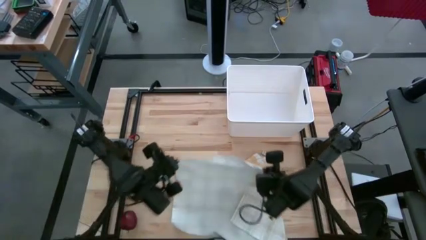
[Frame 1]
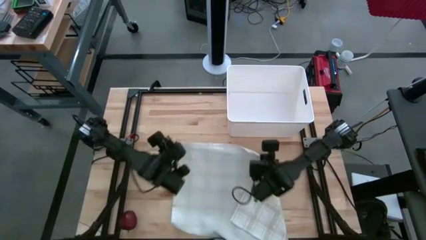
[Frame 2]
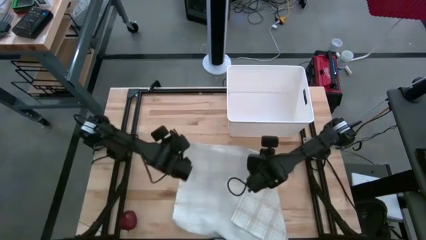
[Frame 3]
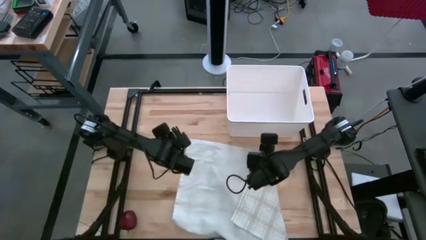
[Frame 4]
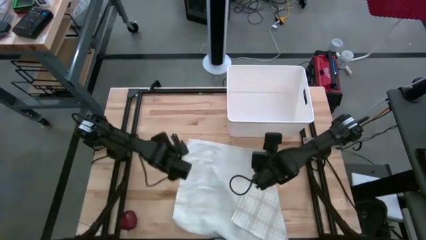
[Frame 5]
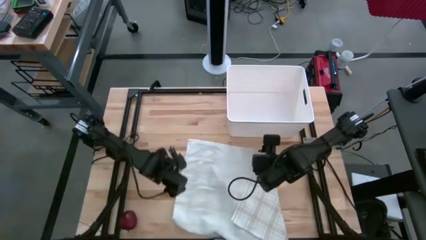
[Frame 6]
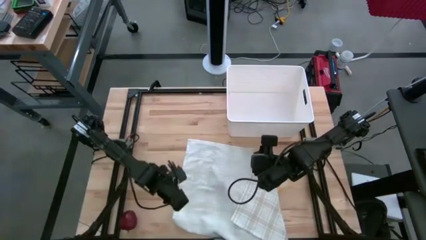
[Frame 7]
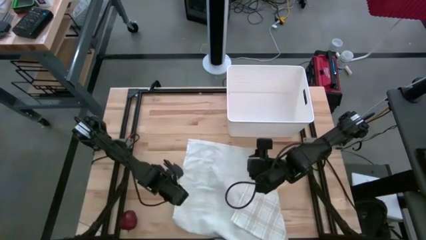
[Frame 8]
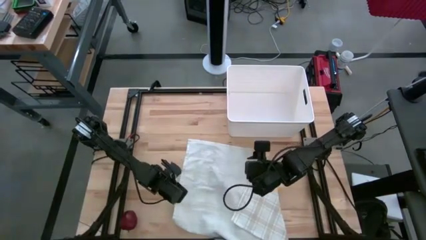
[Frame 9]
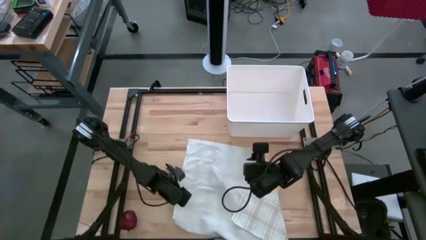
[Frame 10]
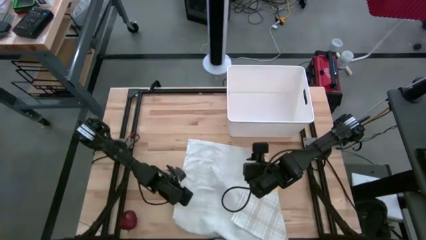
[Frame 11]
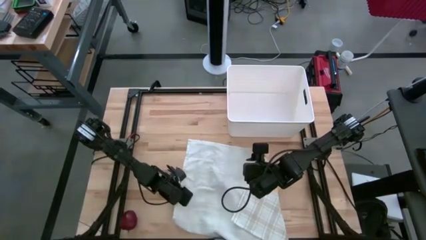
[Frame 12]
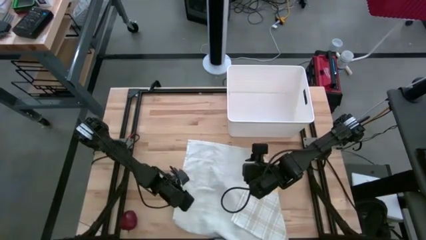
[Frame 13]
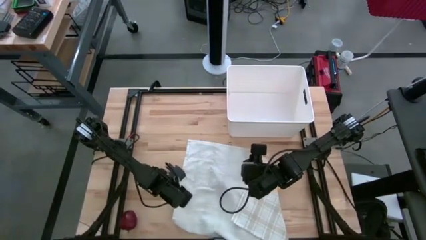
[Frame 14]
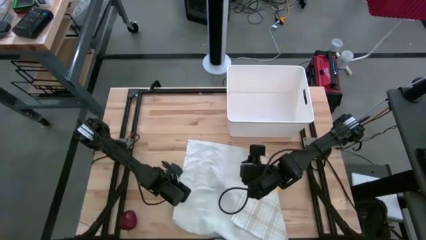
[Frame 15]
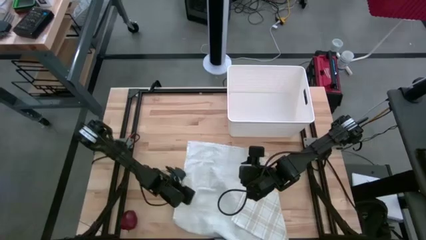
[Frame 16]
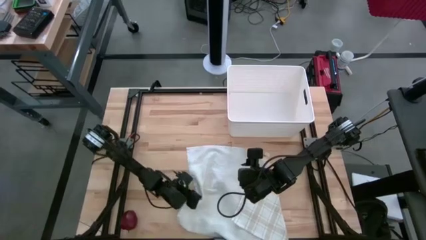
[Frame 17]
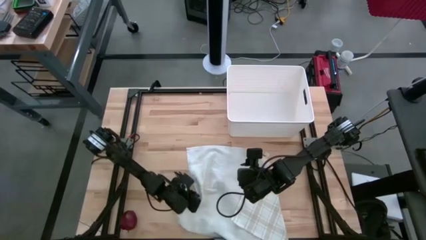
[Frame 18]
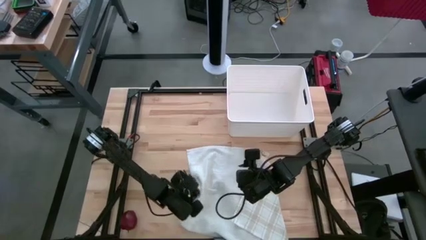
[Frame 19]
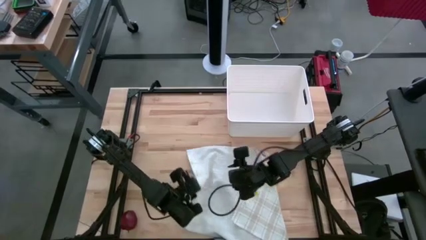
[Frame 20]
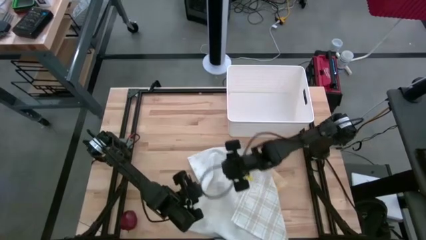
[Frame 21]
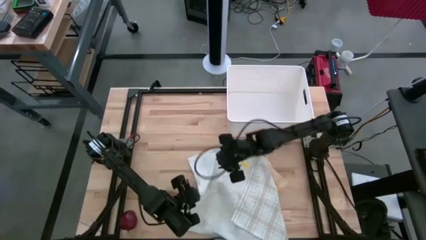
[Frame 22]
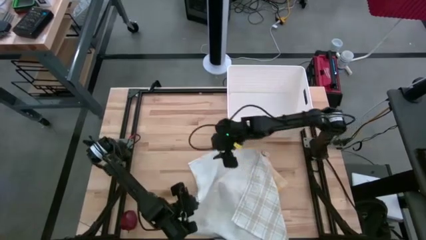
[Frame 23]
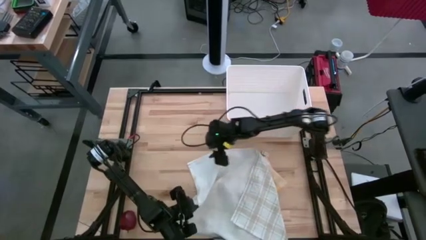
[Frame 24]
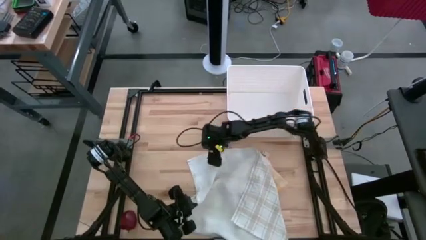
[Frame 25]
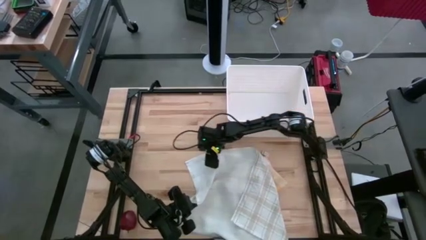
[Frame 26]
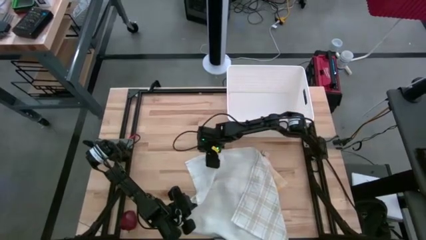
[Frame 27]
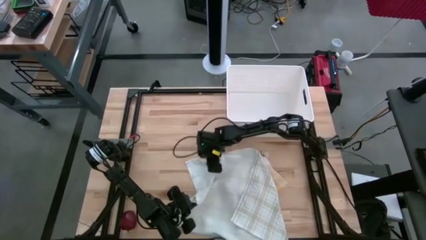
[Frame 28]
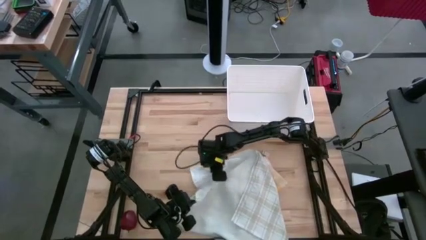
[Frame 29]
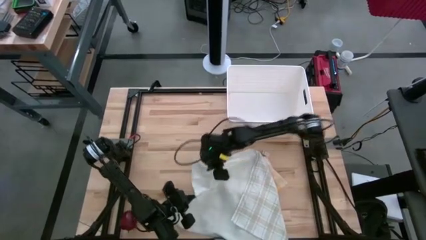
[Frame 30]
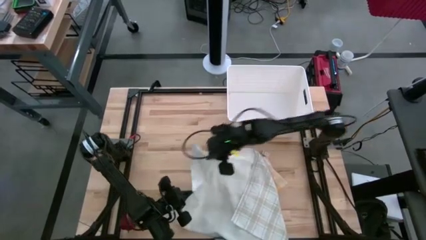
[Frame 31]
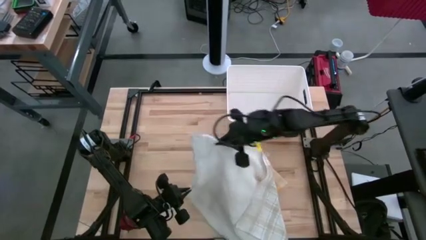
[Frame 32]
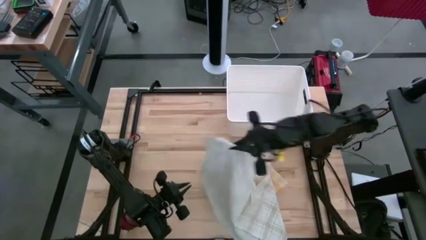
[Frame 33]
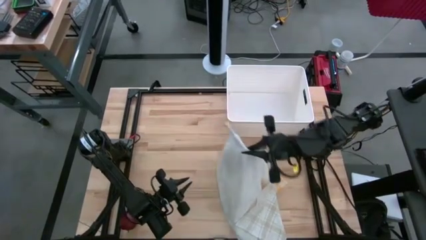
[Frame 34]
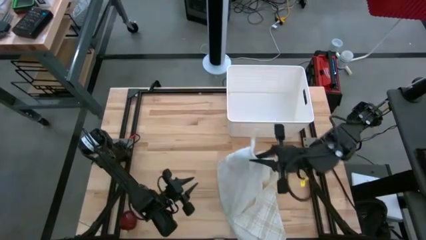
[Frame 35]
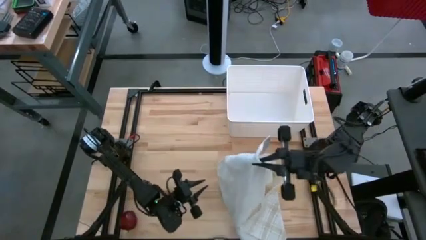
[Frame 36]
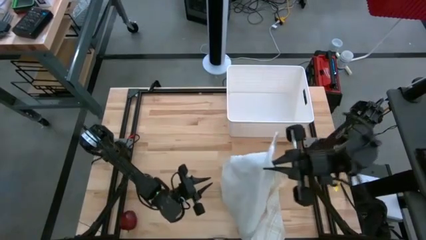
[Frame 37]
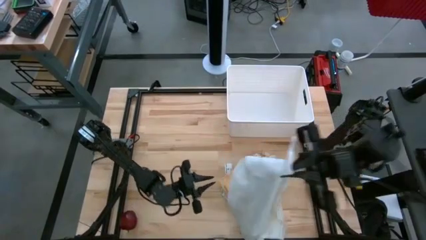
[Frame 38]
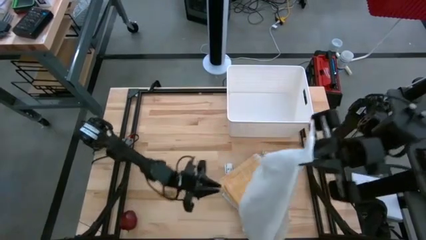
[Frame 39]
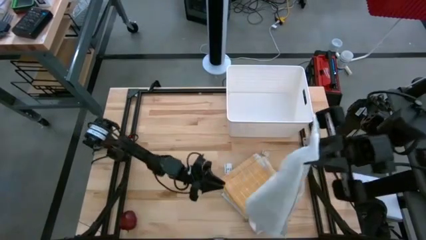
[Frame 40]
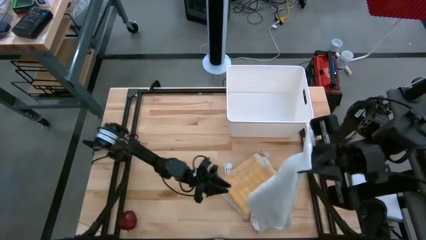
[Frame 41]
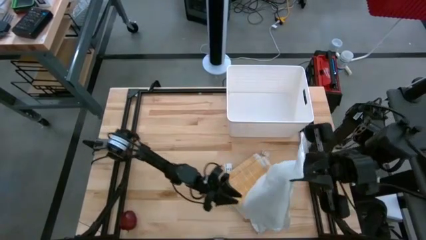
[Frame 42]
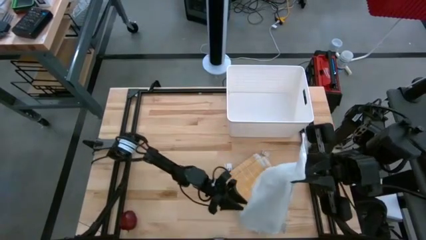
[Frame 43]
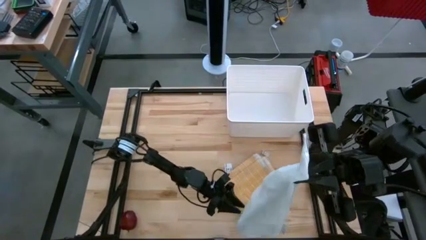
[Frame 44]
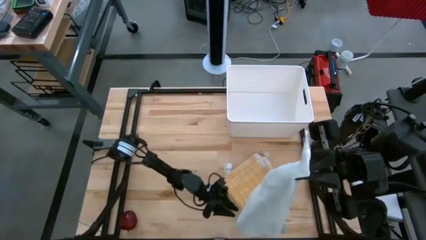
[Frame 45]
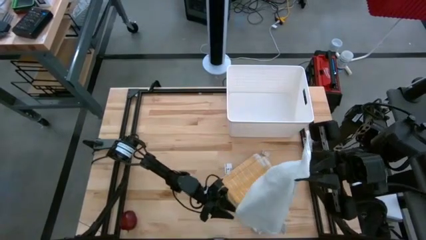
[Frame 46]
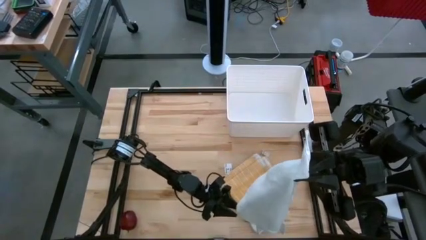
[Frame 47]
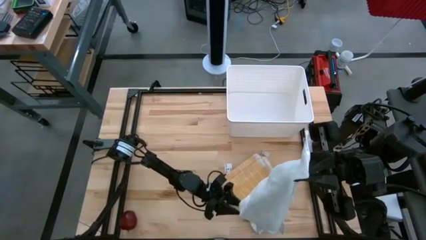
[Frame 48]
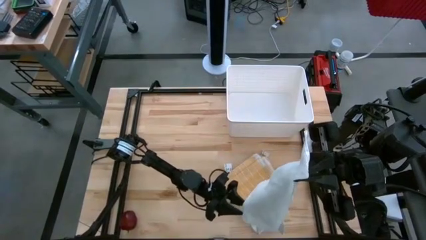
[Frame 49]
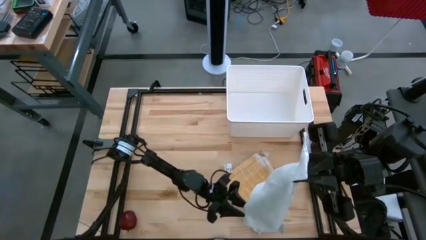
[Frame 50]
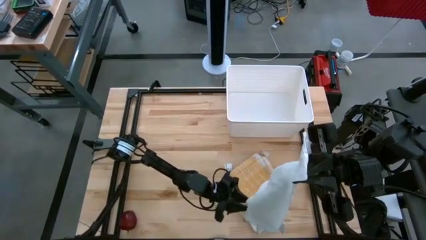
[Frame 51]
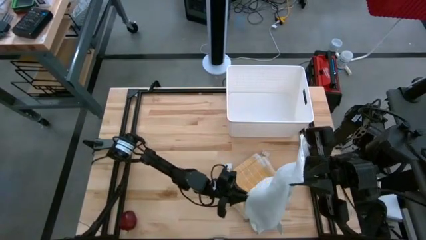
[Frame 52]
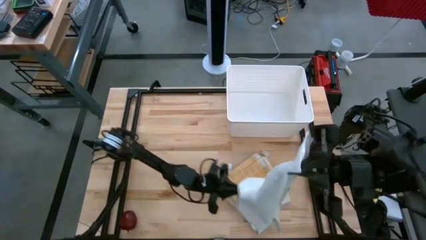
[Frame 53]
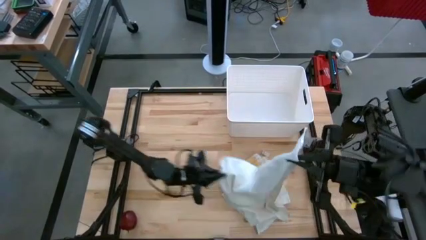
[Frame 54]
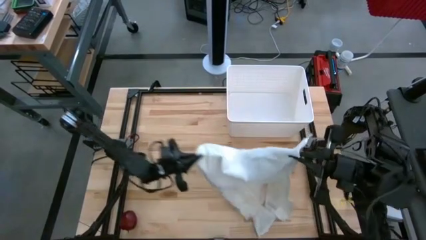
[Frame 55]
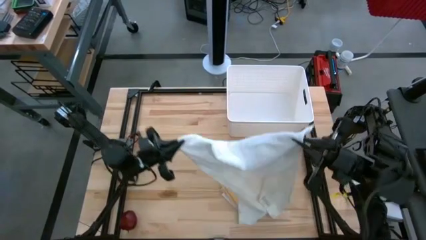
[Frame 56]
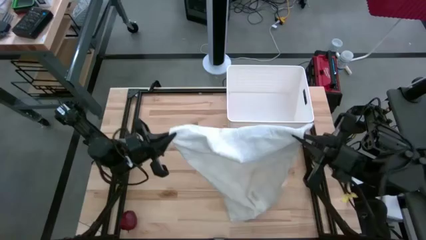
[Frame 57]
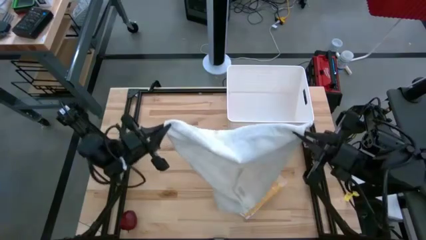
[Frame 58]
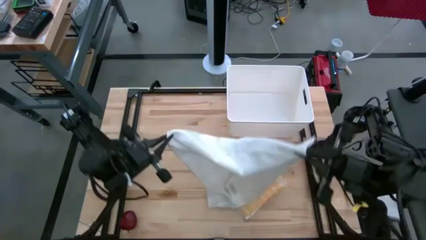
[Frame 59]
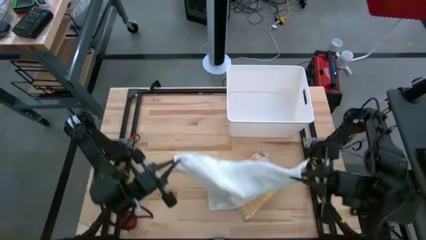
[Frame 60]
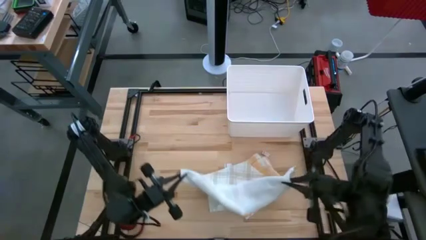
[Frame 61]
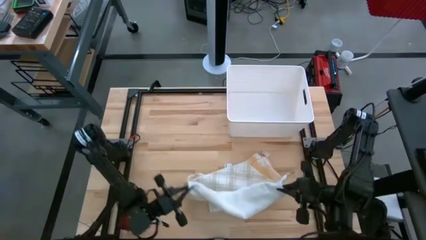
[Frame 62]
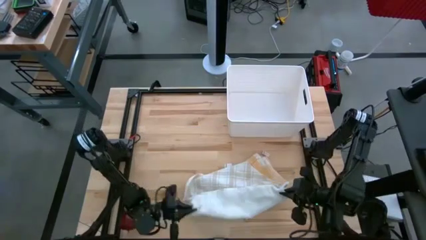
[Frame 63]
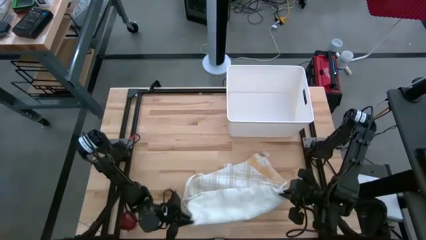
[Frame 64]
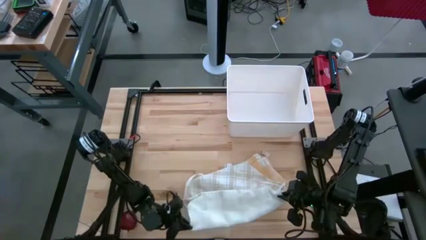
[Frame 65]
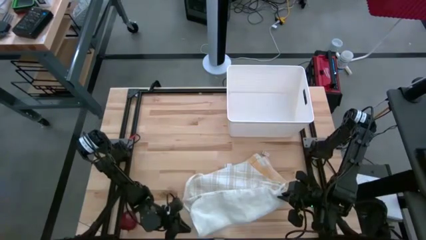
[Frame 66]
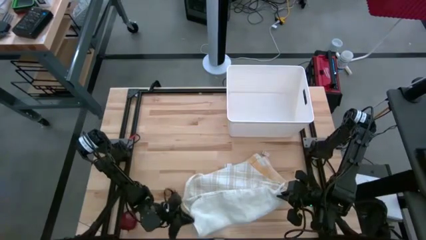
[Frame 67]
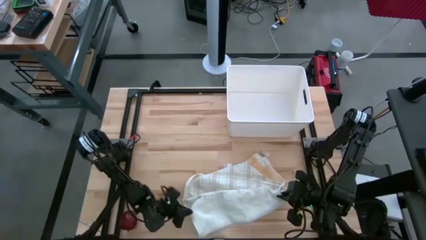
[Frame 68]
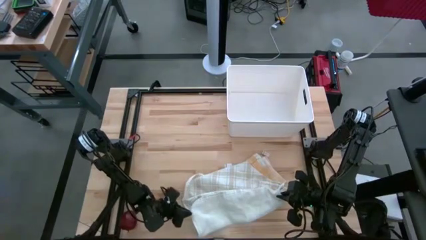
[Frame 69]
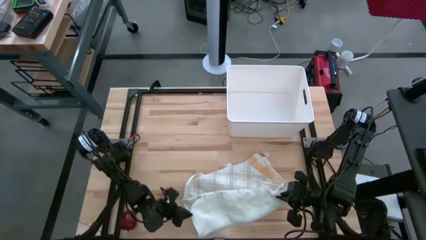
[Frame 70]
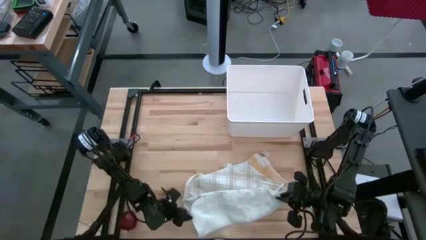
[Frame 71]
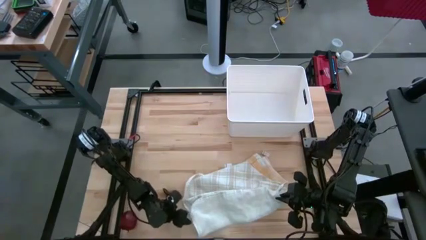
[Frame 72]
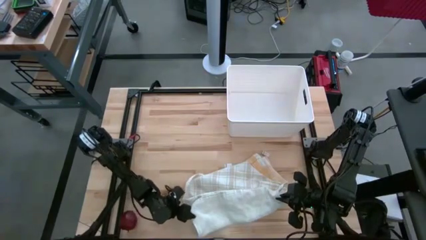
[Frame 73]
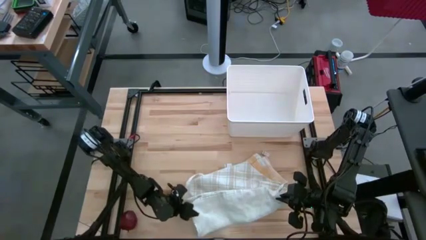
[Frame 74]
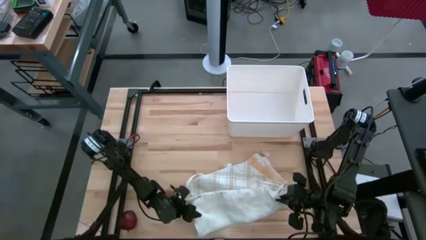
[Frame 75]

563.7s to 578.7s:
Task: Fold towel
Fold the white checkered towel

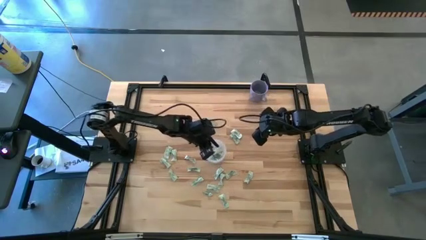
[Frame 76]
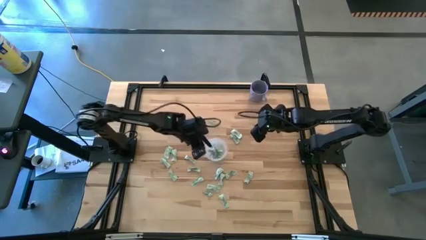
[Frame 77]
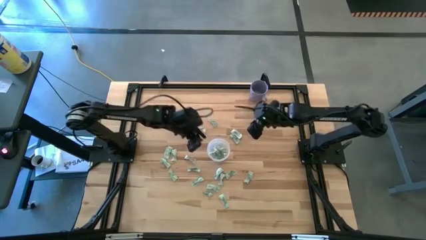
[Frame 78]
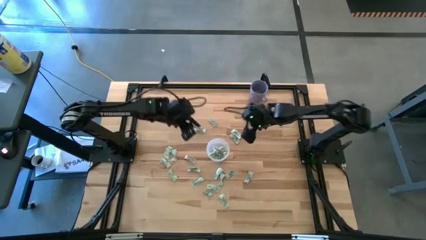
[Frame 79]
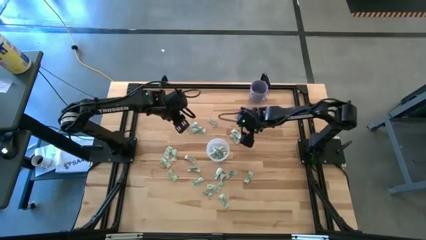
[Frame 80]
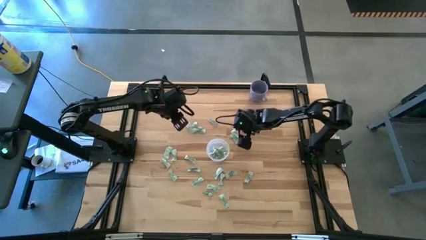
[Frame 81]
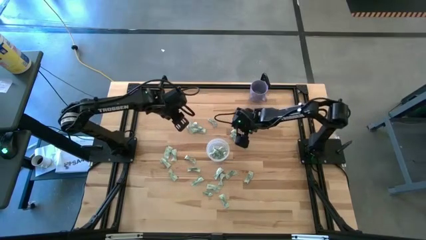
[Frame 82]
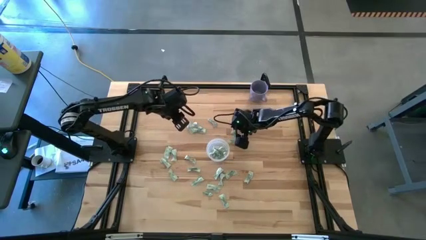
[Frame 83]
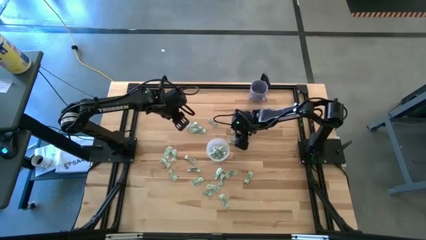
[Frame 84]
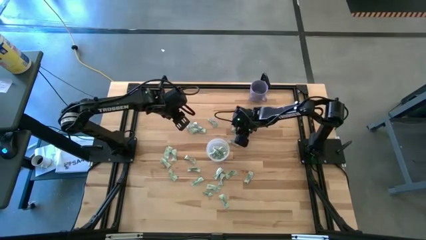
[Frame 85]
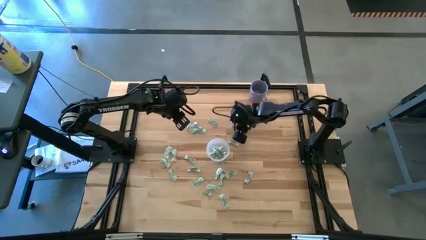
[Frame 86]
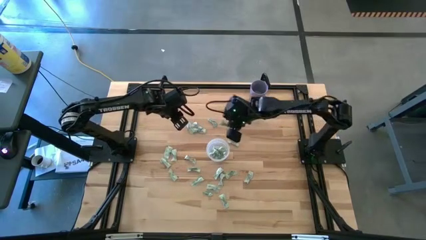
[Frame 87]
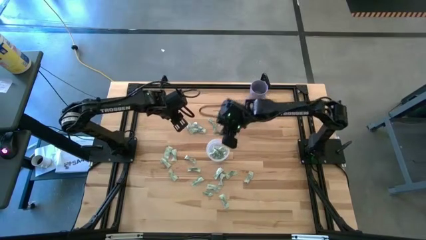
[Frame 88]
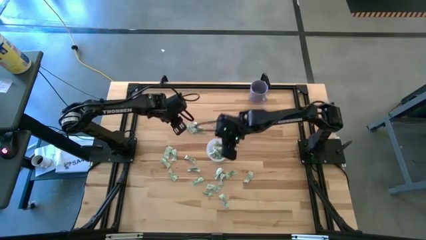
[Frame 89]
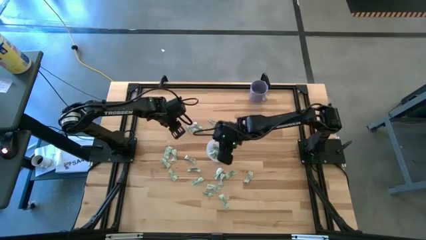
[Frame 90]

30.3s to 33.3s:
Task: Pick and place Stevia / Truvia into bins
Put the green stevia packet into the transparent container
